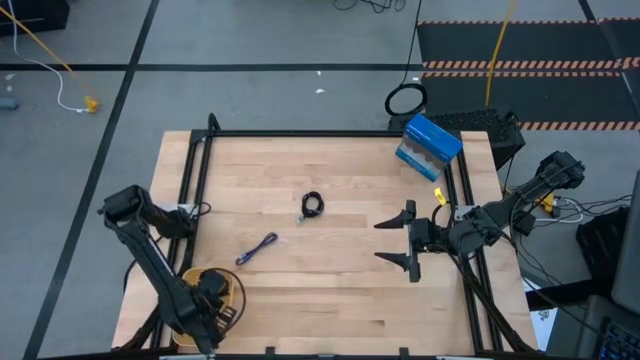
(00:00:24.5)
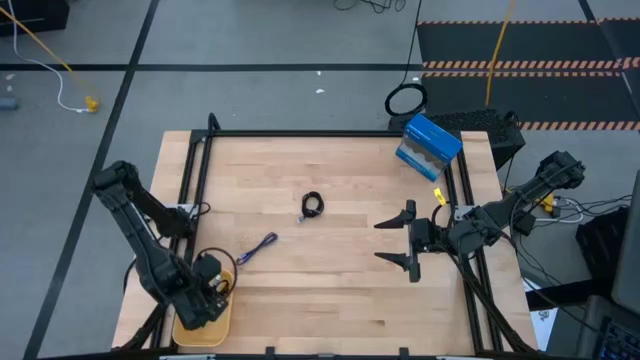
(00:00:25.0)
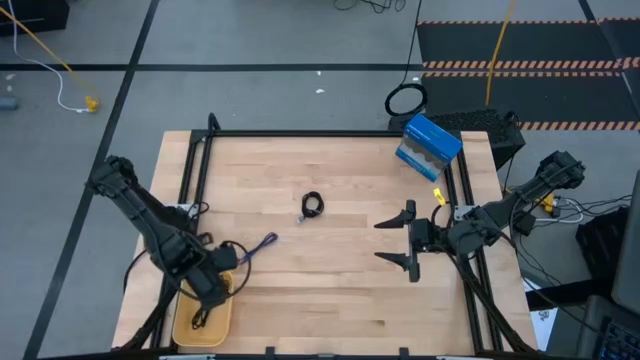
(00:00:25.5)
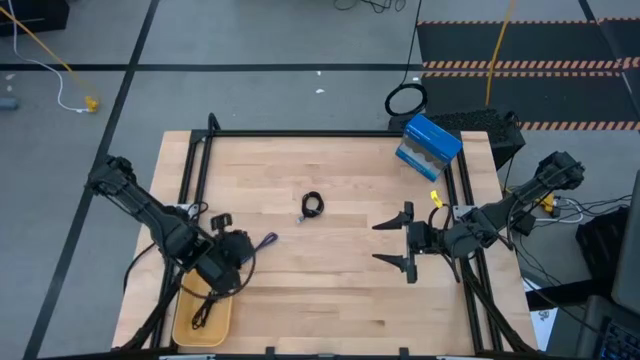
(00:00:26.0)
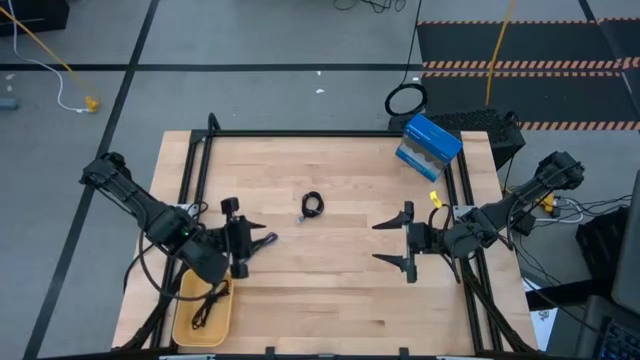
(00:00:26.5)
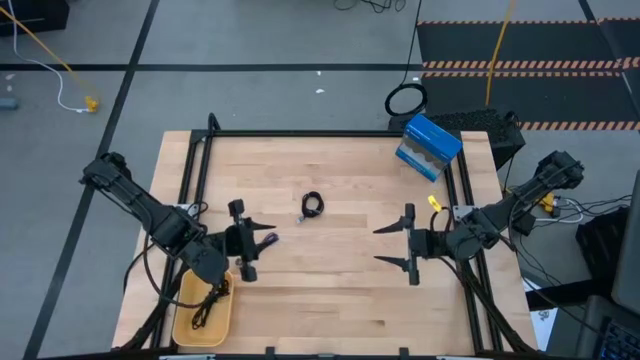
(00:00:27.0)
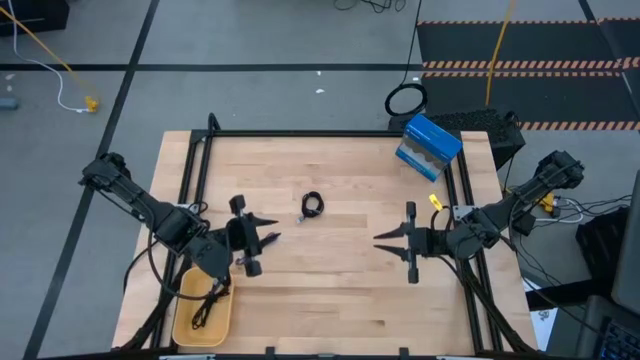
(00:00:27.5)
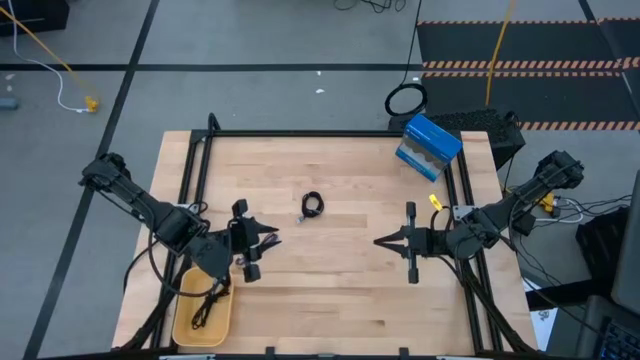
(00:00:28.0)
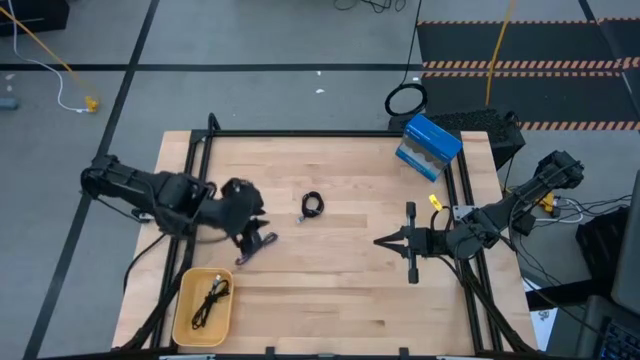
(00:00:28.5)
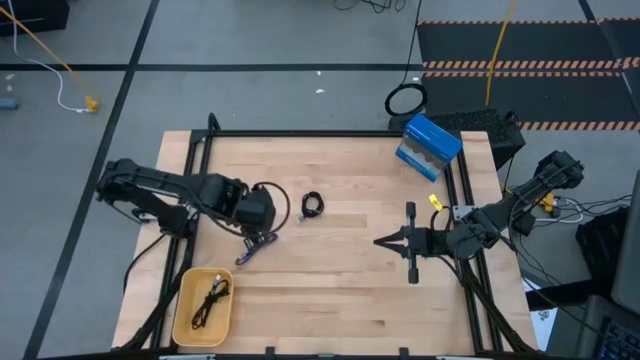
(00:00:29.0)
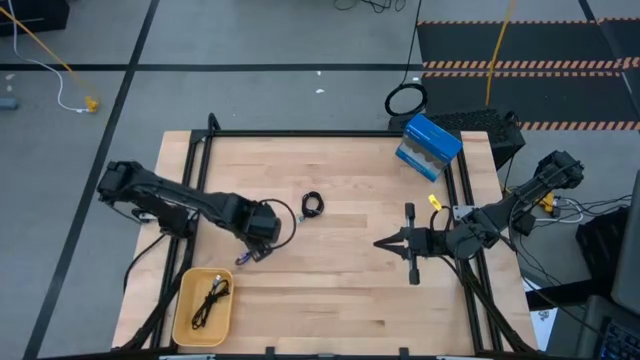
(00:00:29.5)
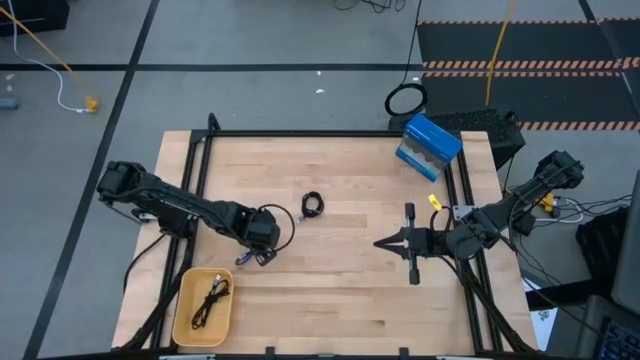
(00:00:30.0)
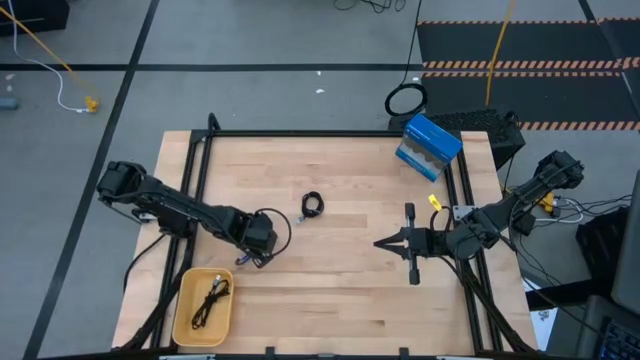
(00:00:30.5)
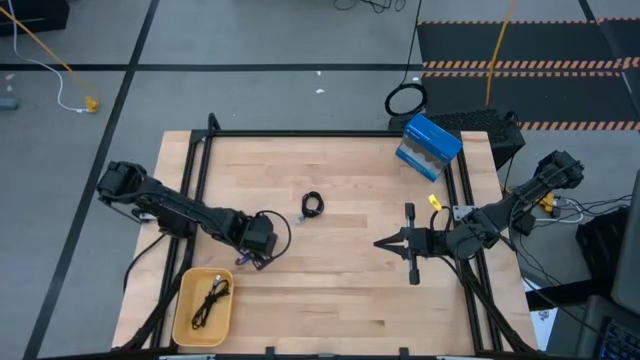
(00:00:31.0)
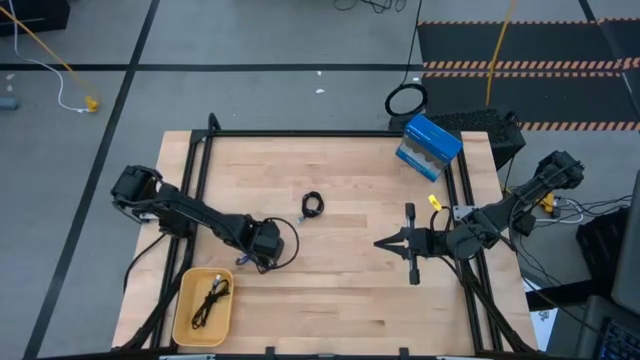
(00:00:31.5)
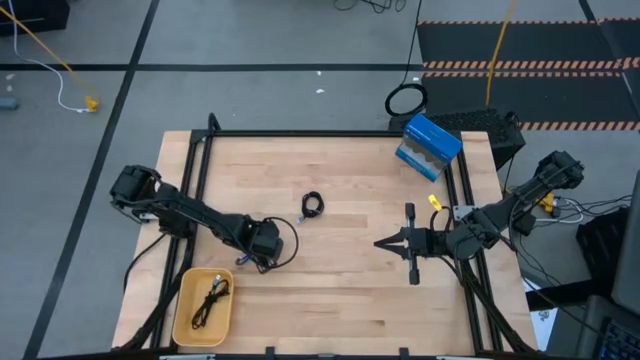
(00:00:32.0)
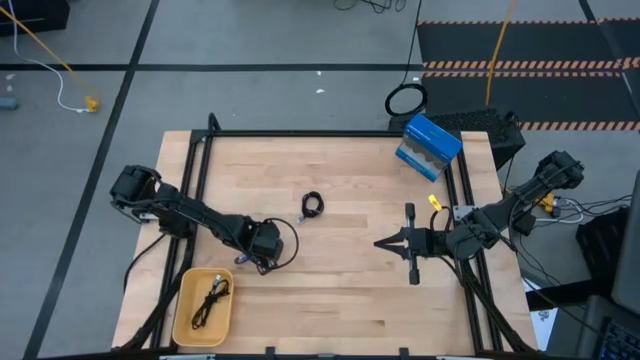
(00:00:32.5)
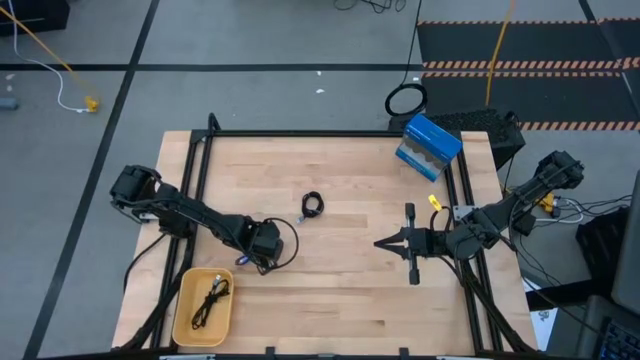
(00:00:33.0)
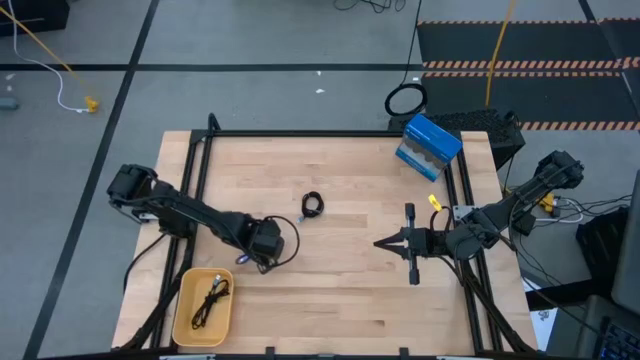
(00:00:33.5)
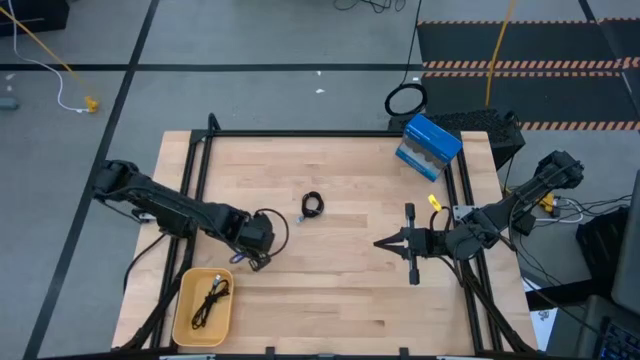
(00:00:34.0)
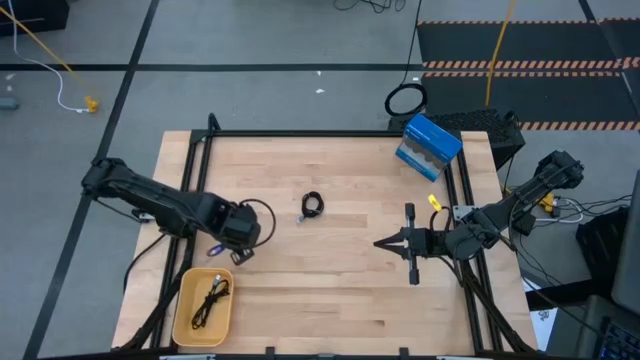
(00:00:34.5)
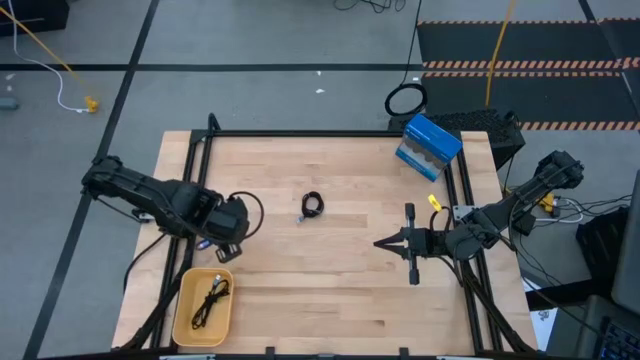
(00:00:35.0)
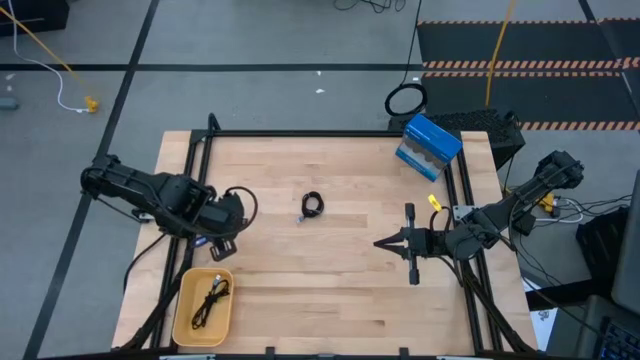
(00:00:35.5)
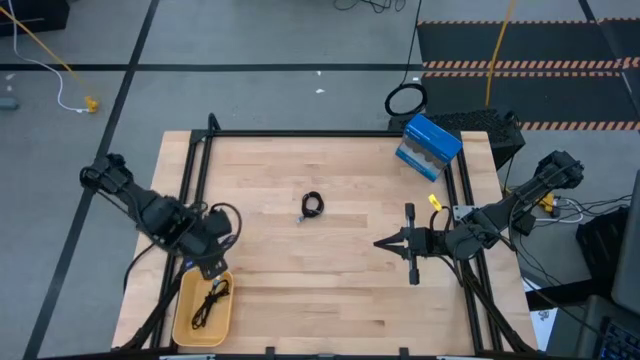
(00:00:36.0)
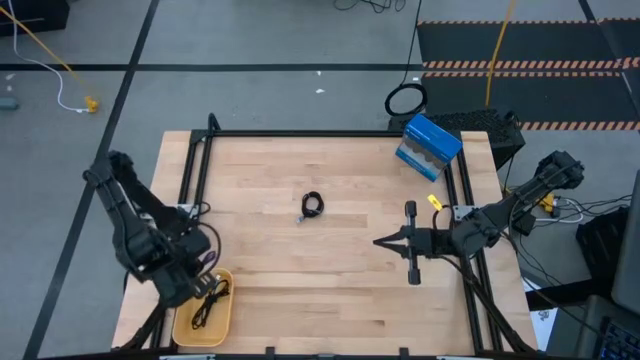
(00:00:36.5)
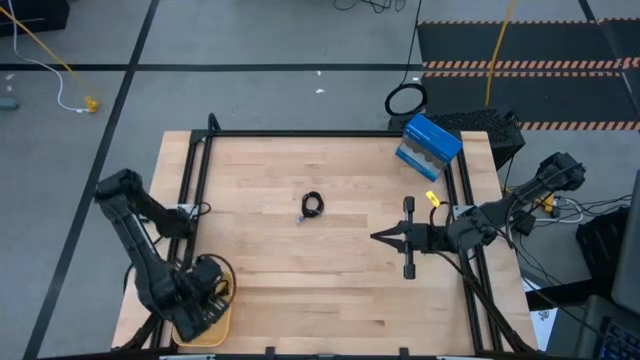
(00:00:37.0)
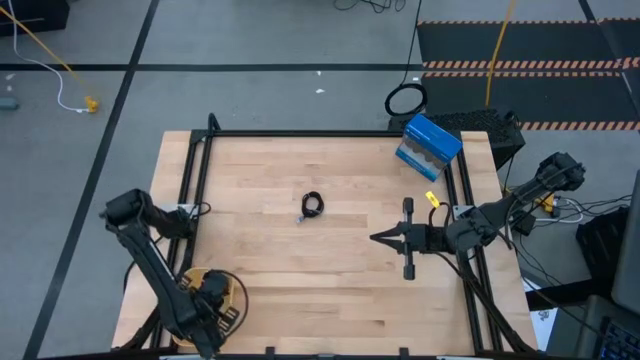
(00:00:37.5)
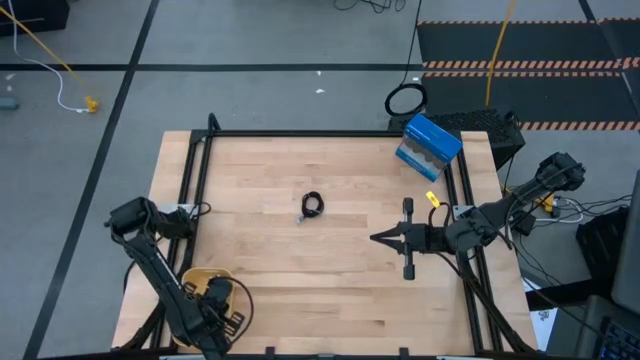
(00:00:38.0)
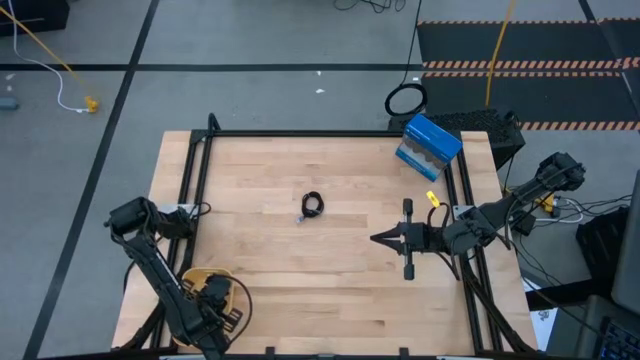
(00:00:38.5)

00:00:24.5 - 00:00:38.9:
Task: Pick and place USB-C Cables
Put the blue charger cable into the yellow bin

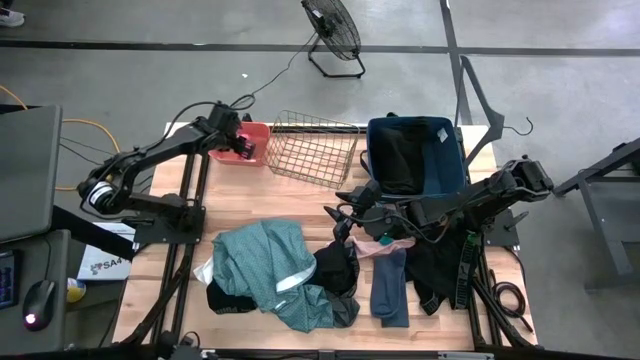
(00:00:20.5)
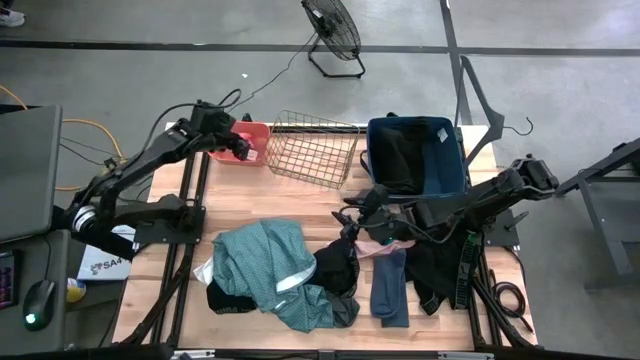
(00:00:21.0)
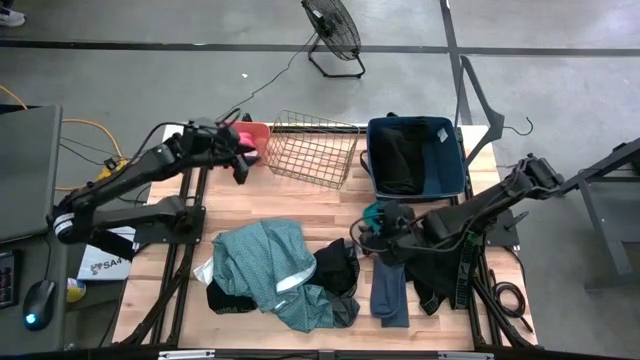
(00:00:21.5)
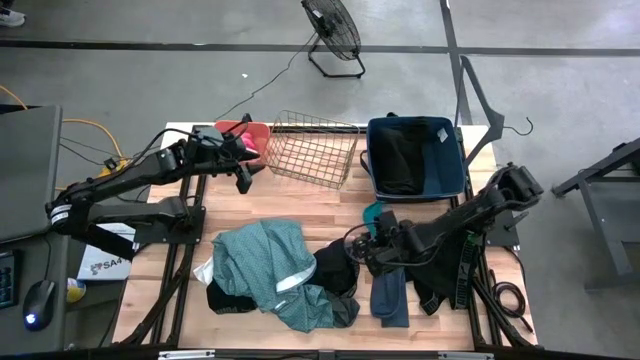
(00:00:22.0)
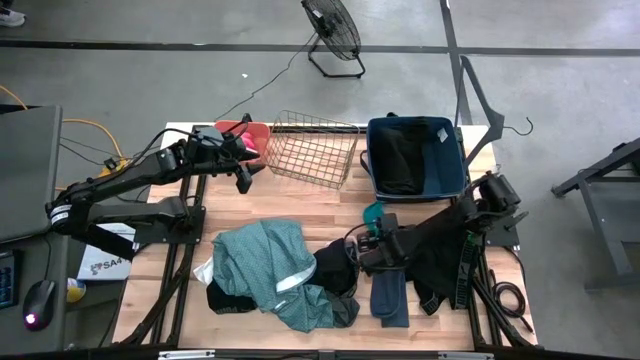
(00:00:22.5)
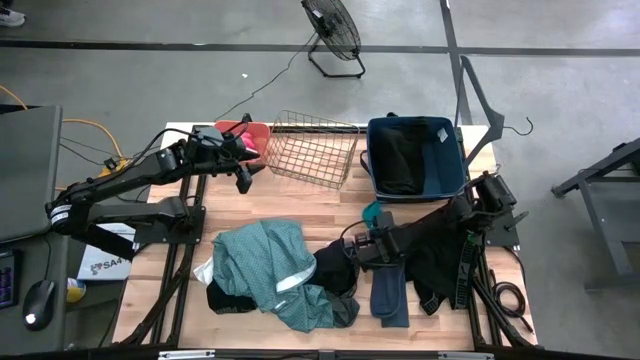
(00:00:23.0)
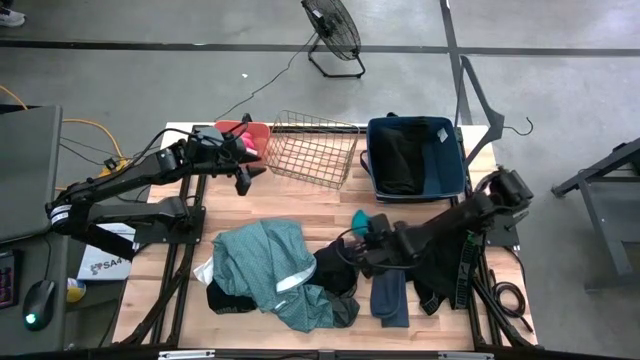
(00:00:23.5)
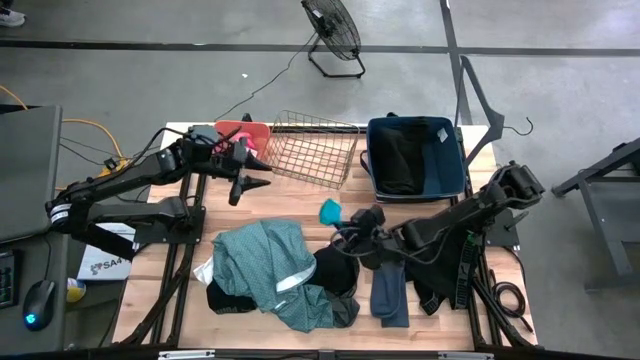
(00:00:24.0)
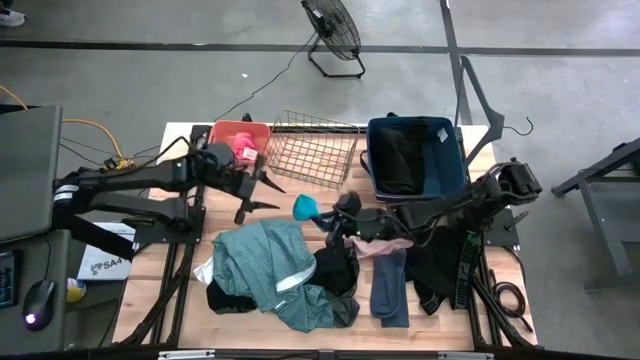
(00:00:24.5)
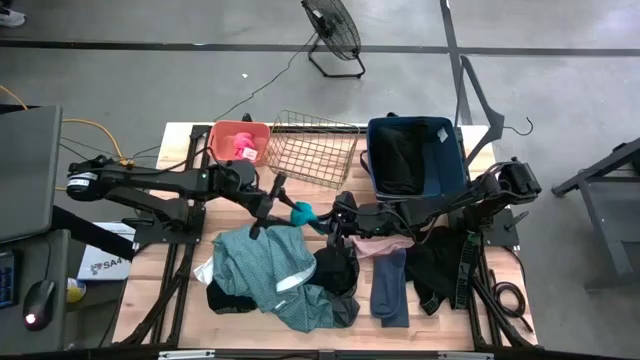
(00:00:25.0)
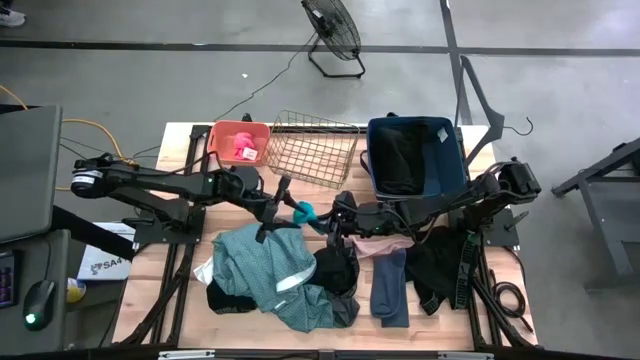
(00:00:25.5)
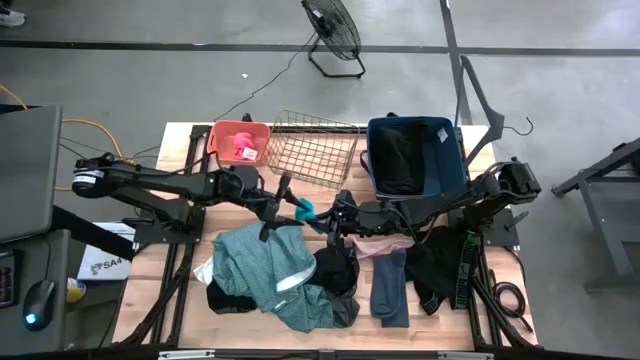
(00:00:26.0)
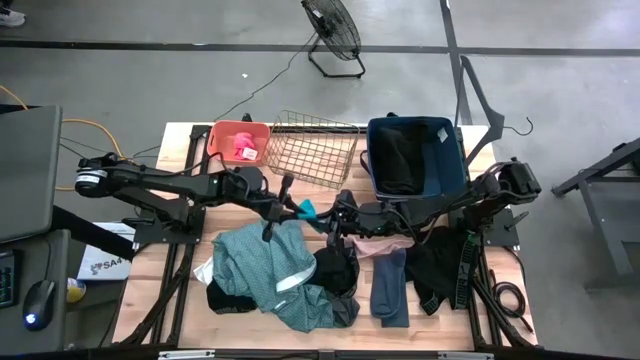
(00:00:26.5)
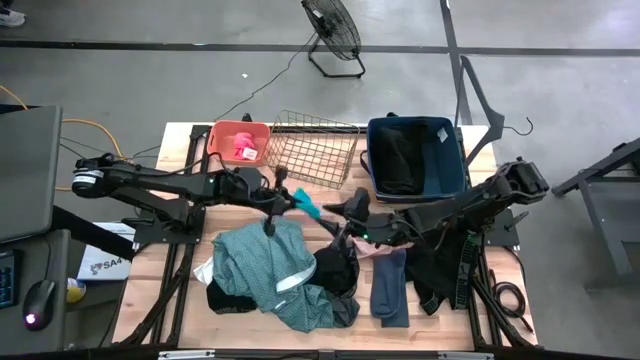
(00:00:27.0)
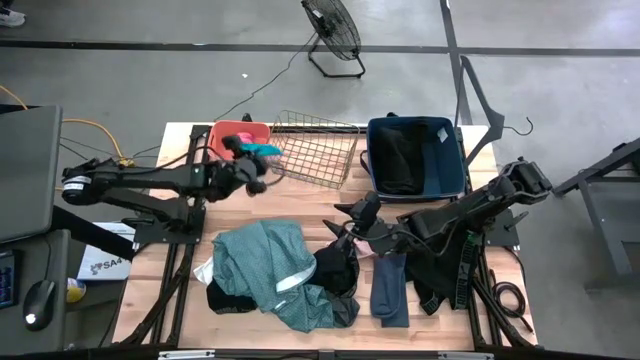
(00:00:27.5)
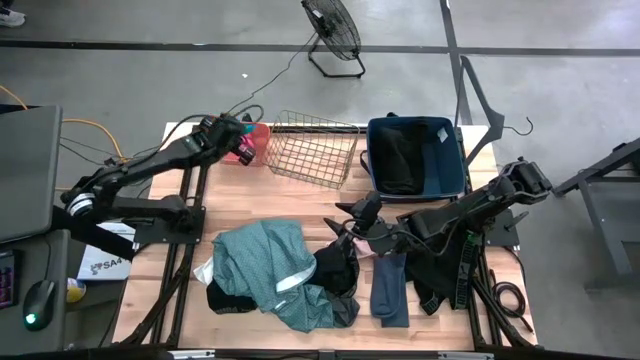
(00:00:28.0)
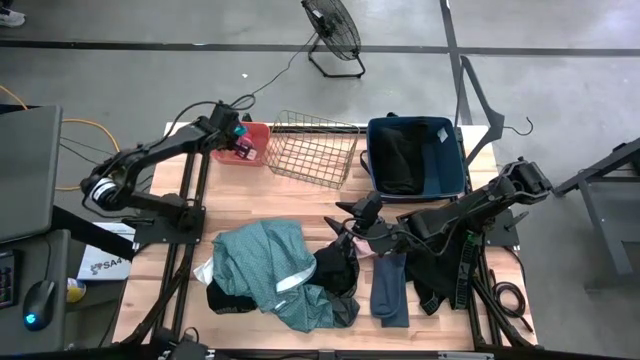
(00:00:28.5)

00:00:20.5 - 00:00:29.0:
Task: Pick & Place Cloths
Put the blue sock into the orange bin
